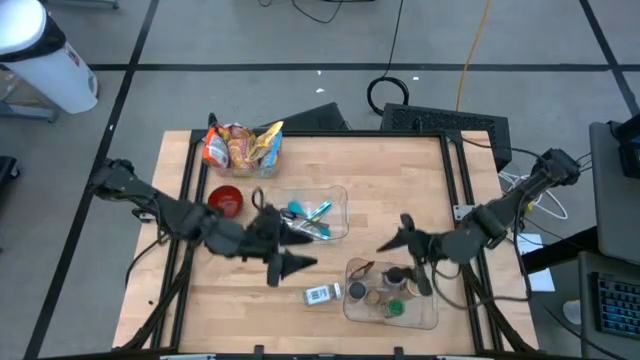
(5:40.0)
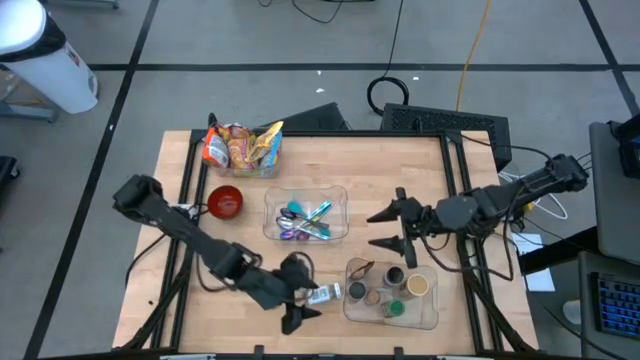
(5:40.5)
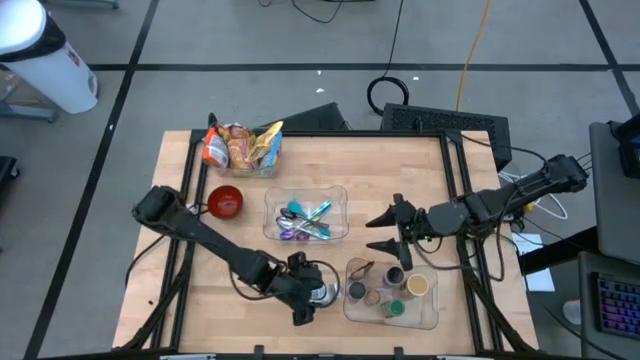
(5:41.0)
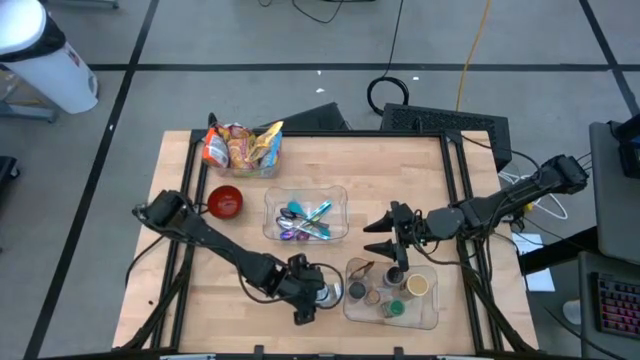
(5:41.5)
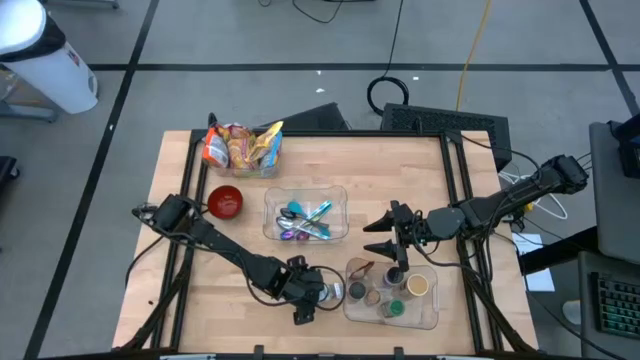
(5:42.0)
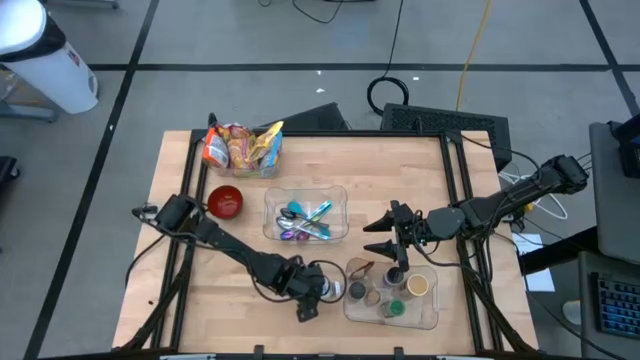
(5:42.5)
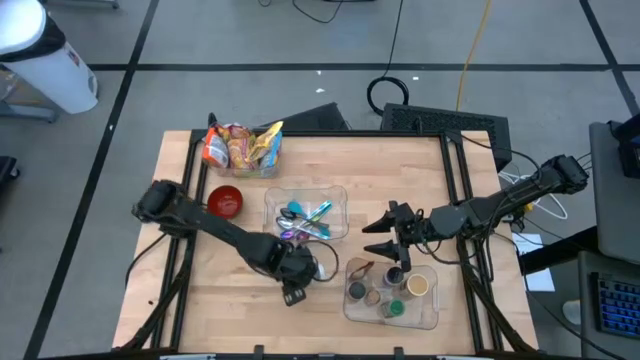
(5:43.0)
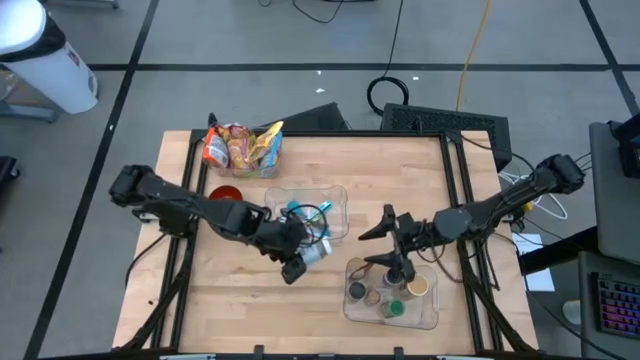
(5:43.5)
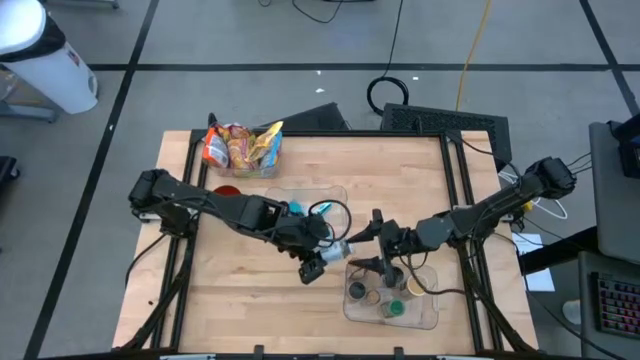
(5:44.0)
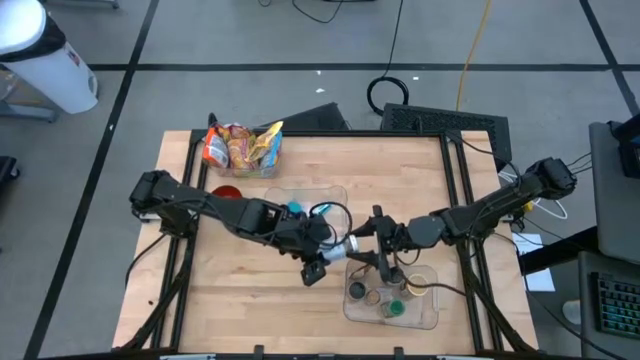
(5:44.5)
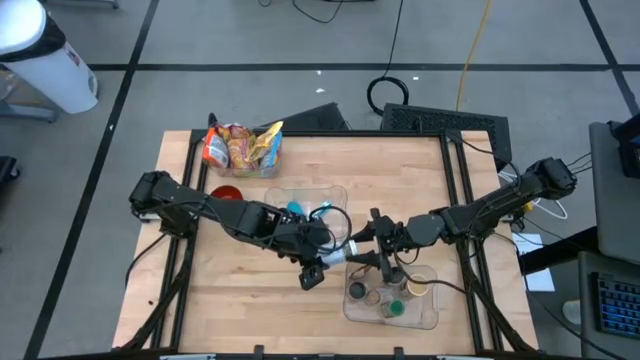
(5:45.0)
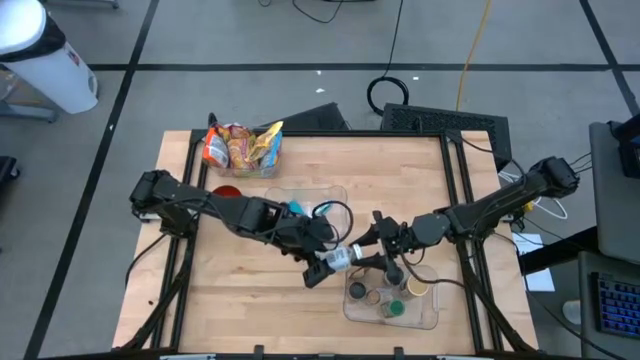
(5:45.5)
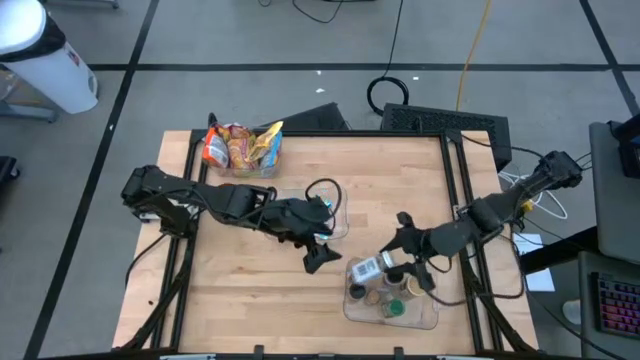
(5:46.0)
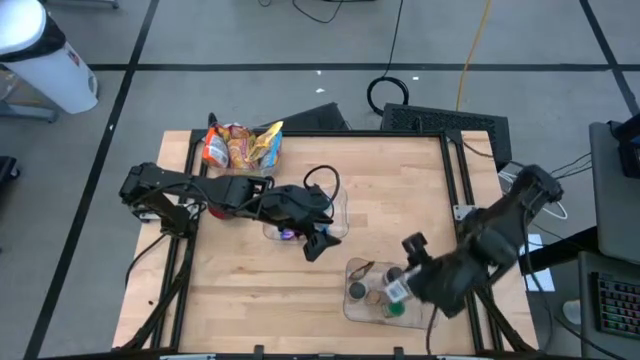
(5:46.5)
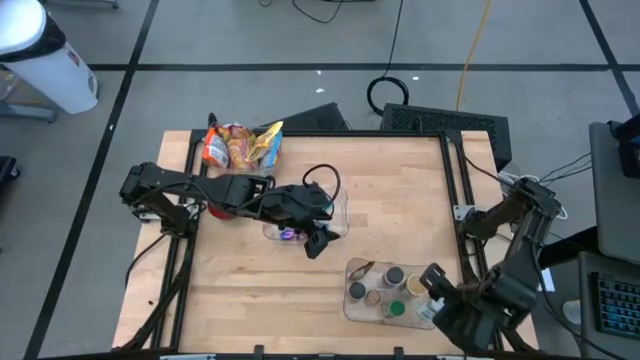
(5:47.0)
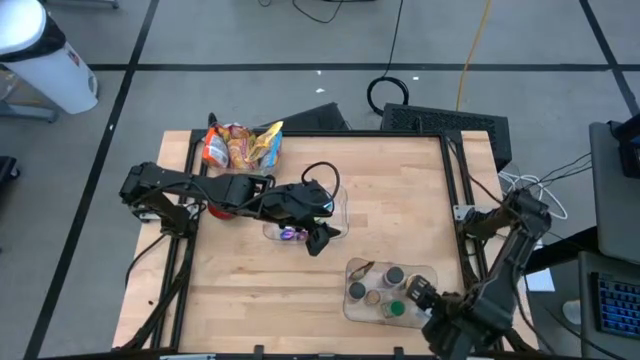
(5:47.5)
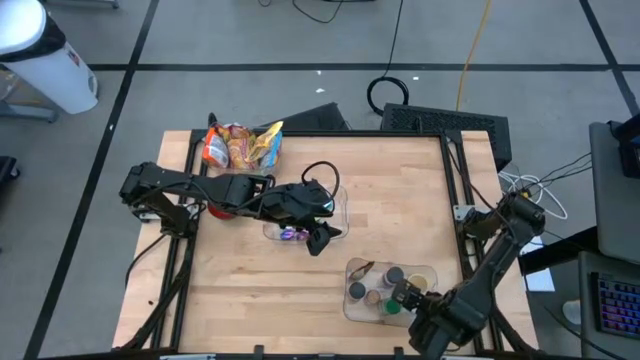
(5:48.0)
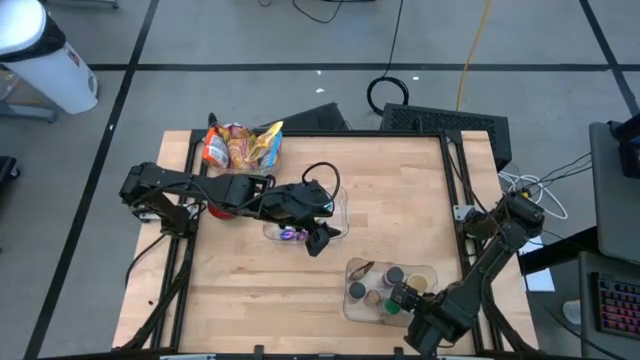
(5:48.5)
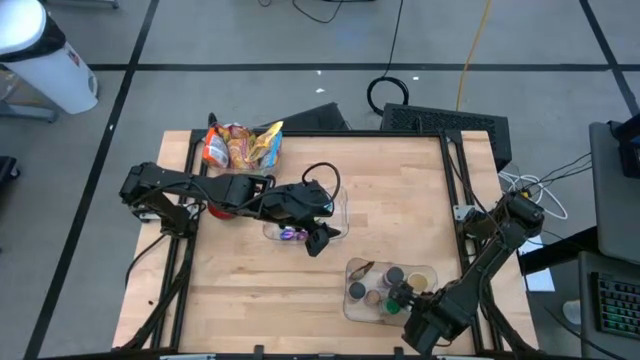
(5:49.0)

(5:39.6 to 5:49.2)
Task: Pick & Place Food Item
Put the white seasoning bottle into the bottom transparent bin

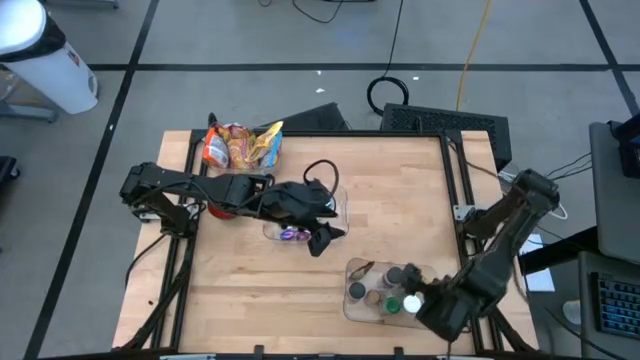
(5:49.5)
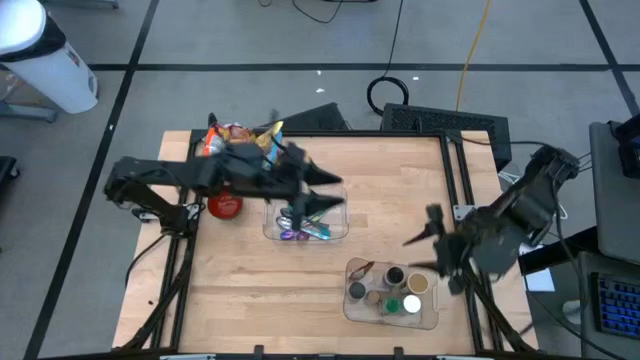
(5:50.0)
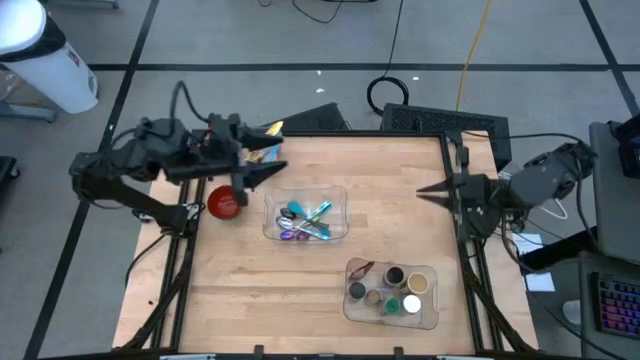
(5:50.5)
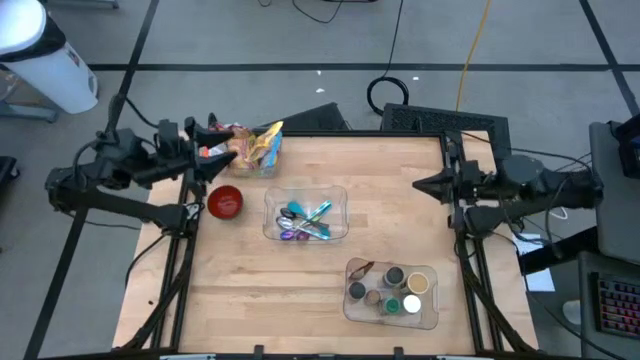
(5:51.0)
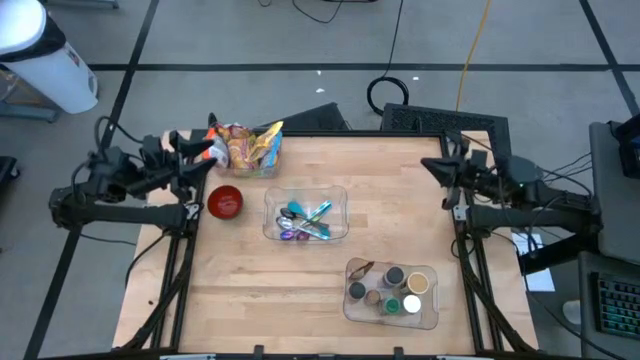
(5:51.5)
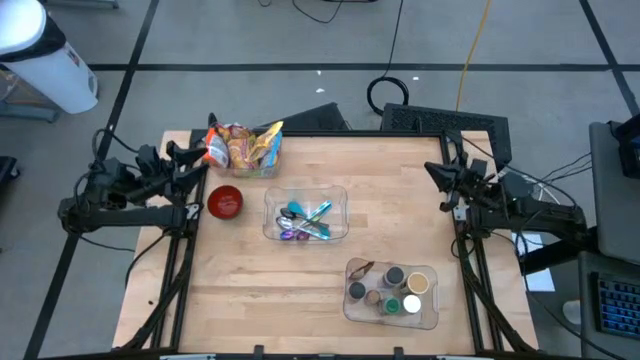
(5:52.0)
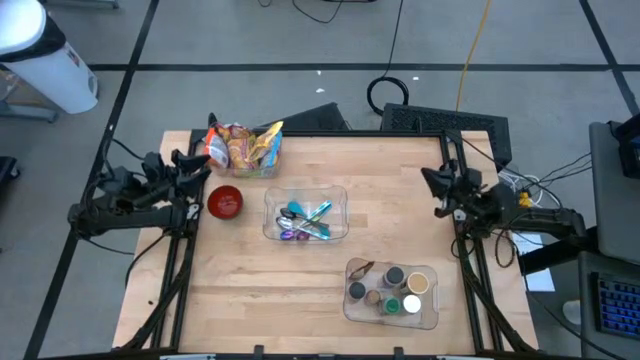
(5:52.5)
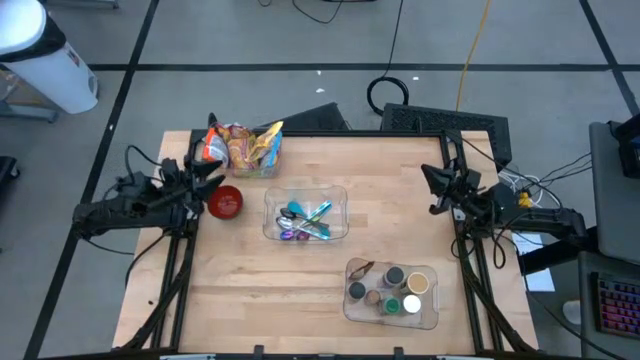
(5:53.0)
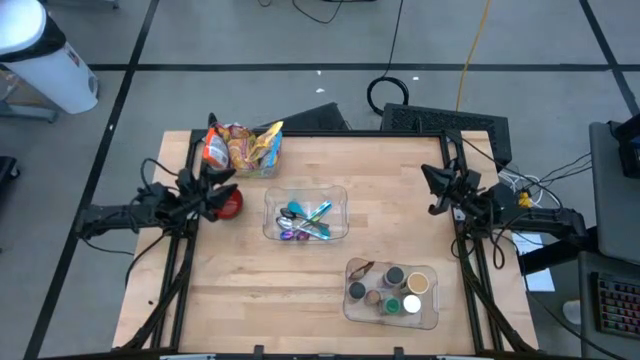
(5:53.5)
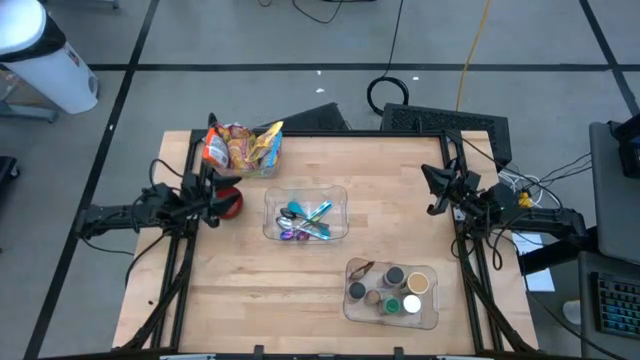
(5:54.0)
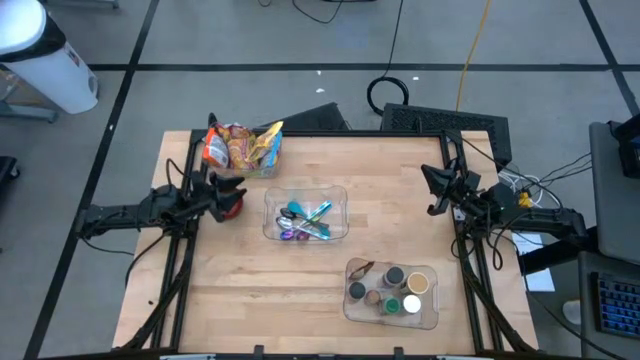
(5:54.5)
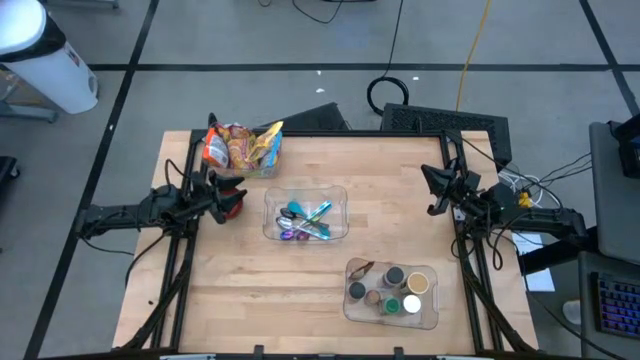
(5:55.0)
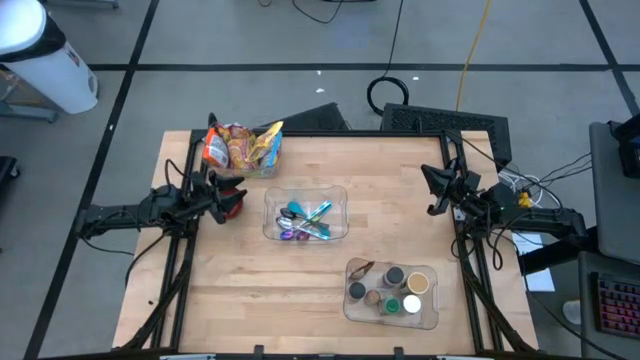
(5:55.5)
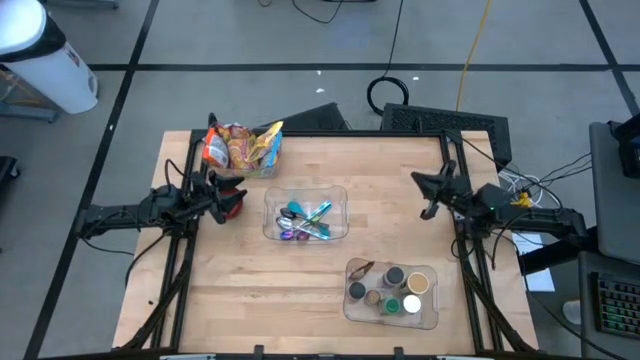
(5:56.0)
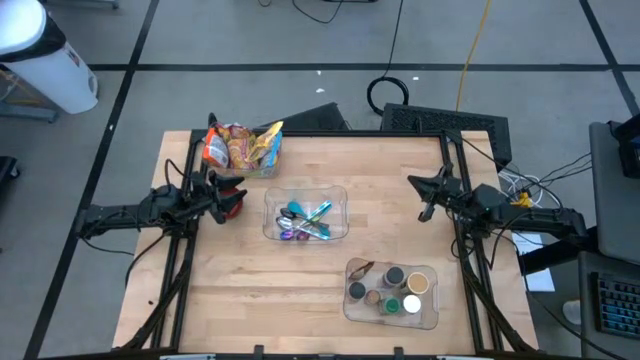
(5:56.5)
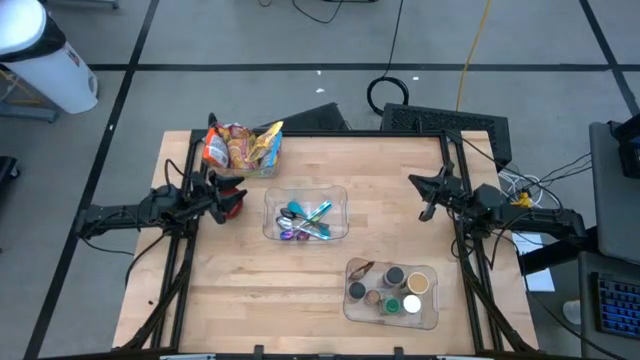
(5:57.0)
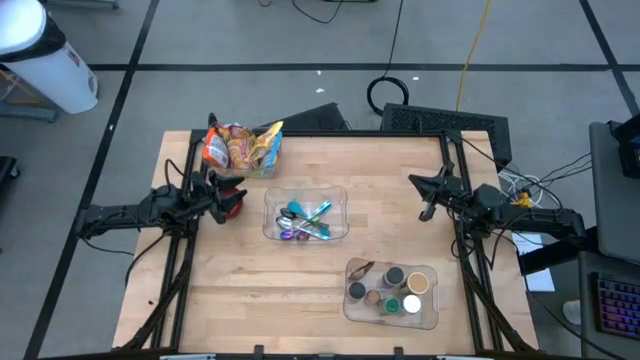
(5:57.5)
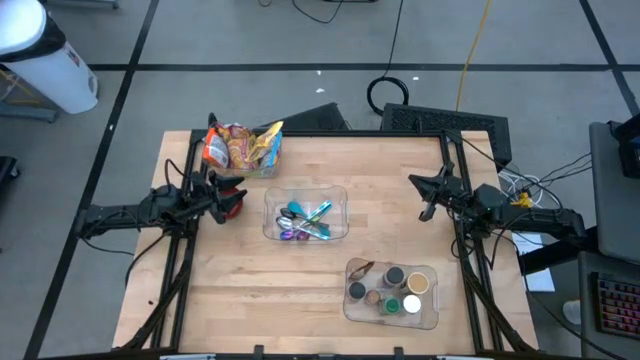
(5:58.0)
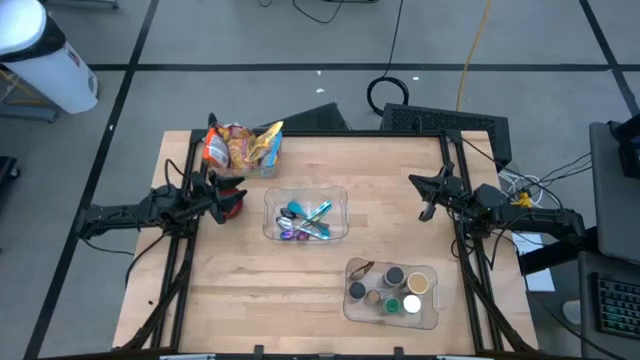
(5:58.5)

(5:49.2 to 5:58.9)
Return to Home Position

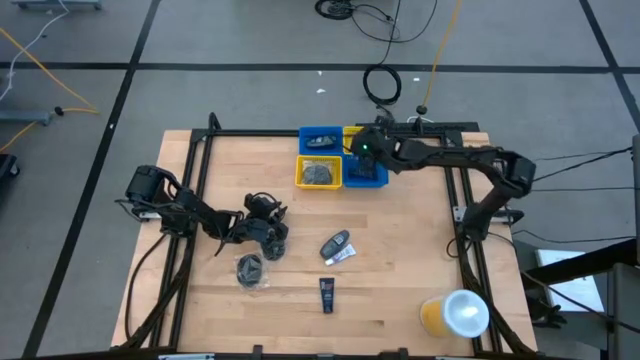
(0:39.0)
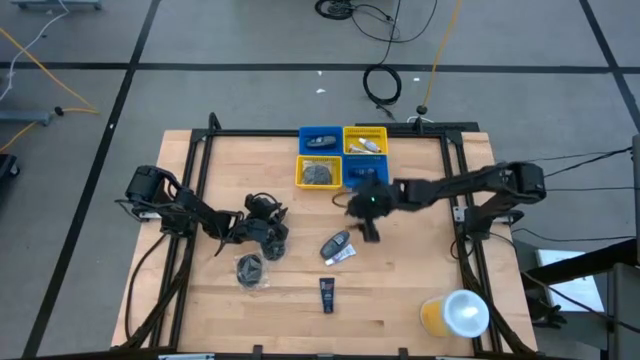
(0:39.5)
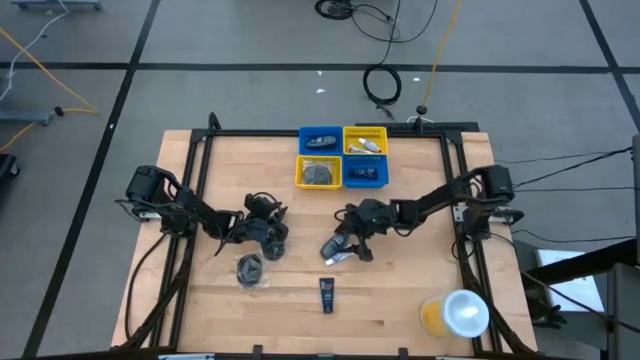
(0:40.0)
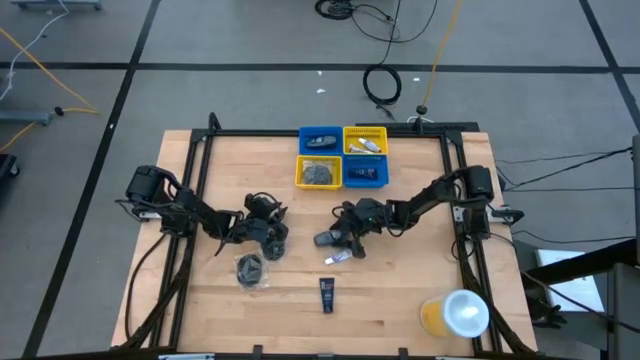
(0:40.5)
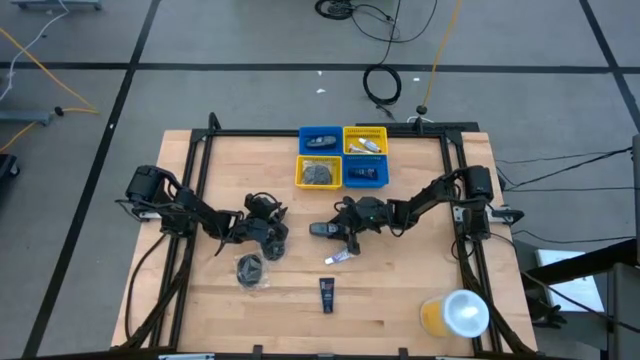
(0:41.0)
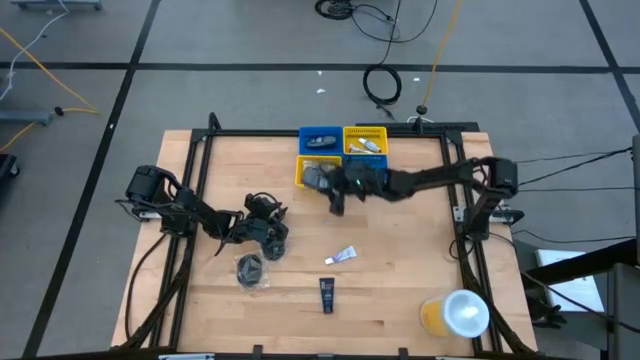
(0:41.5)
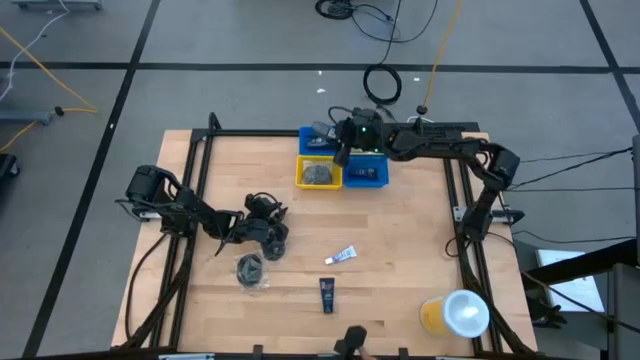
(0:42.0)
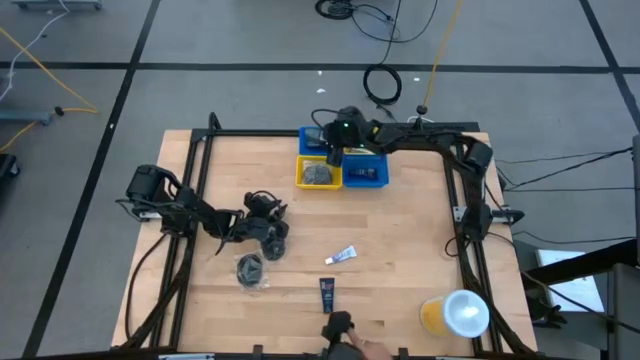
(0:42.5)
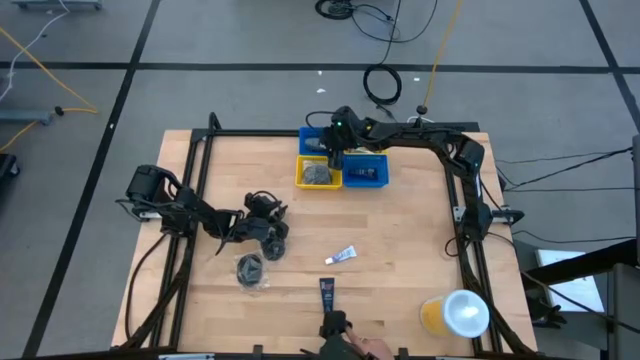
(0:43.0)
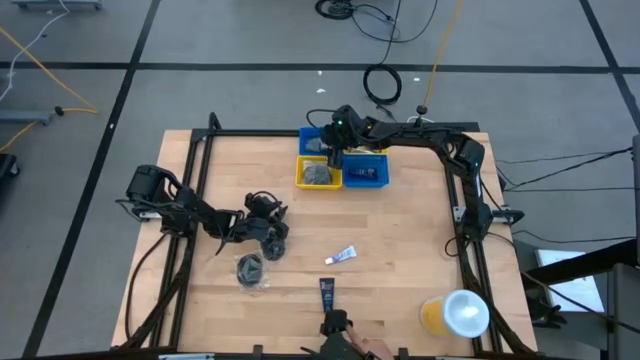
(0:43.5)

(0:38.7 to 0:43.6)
Task: Pick & Place Travel size toiletries
Put the gray deodorant into the left blue bin
